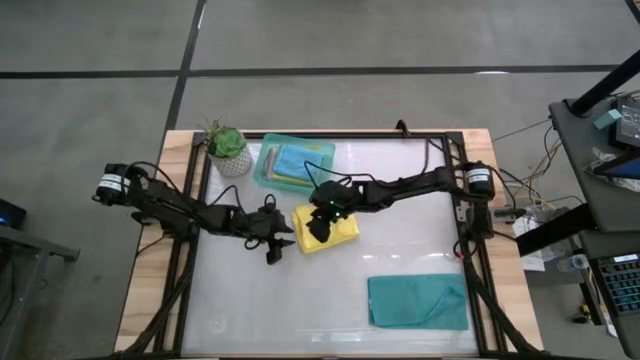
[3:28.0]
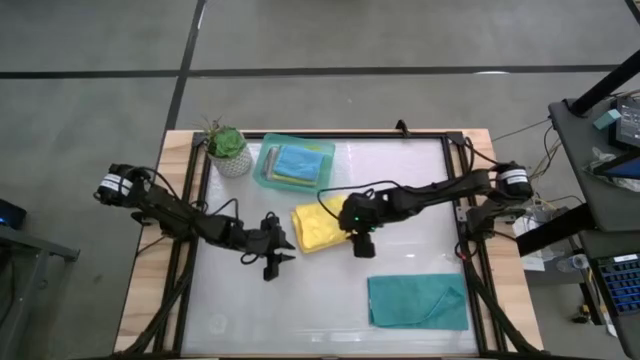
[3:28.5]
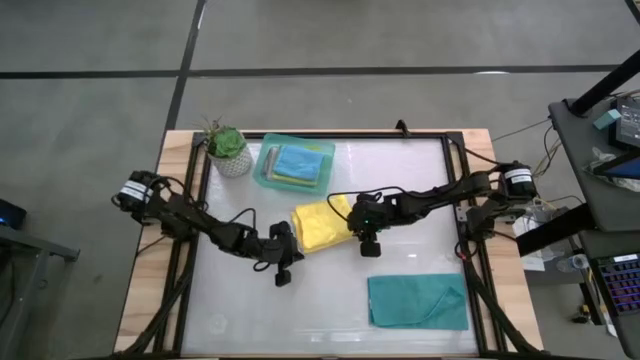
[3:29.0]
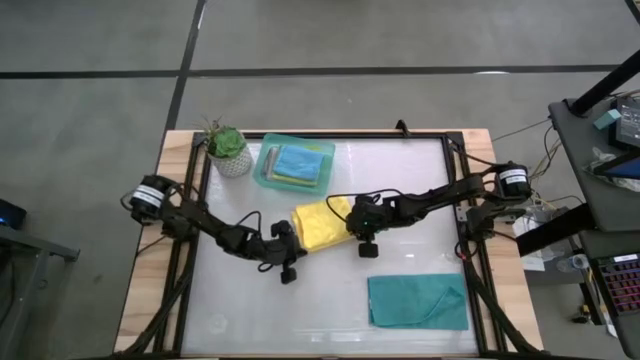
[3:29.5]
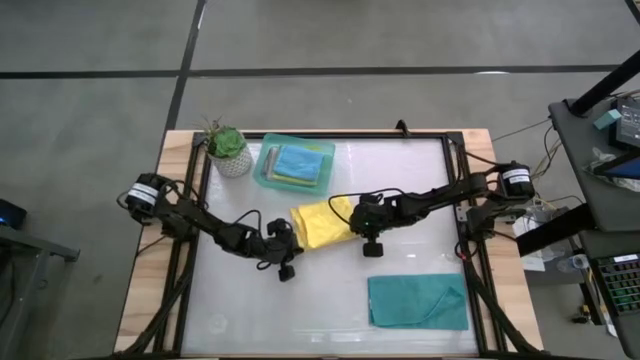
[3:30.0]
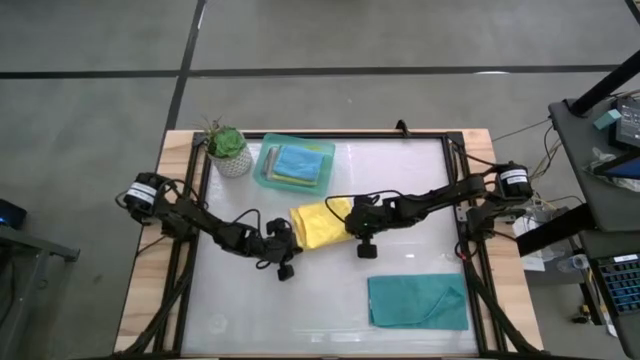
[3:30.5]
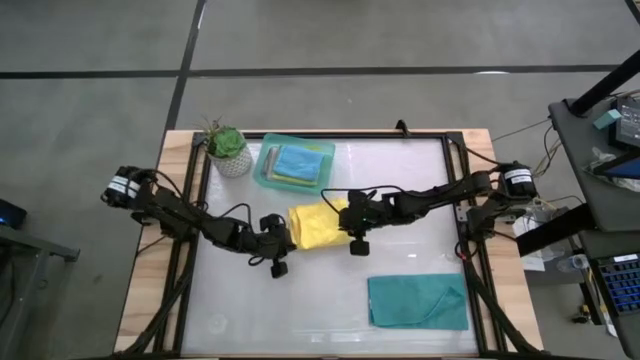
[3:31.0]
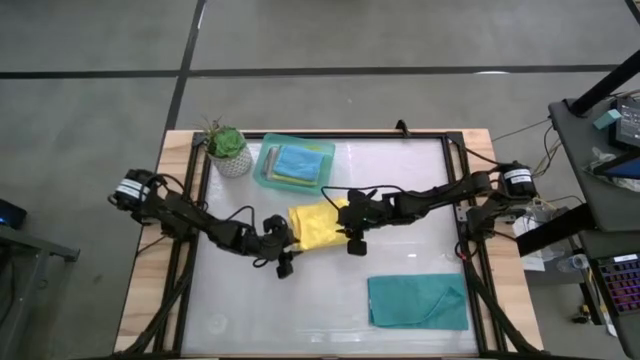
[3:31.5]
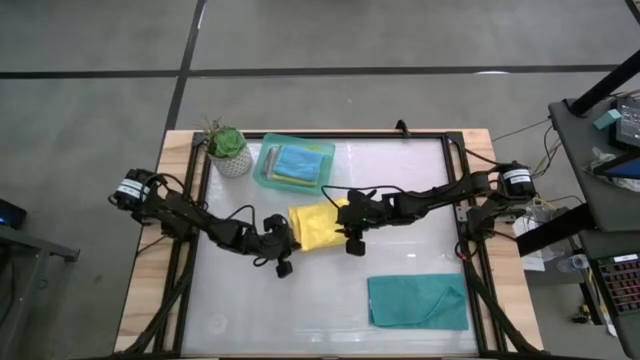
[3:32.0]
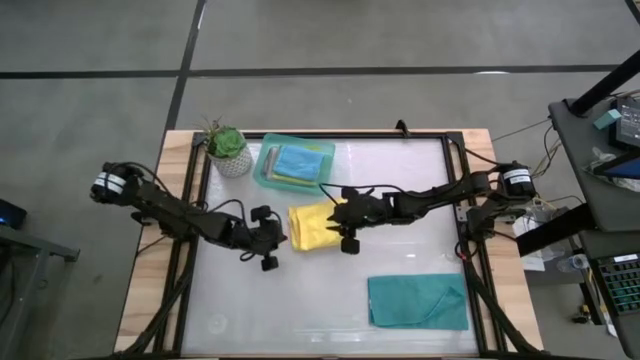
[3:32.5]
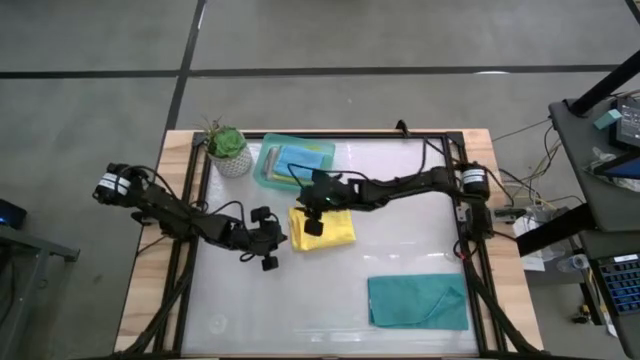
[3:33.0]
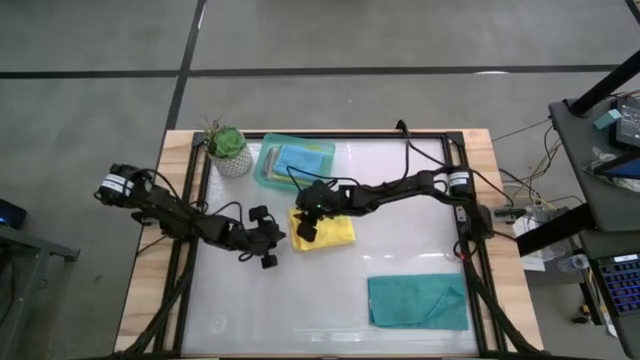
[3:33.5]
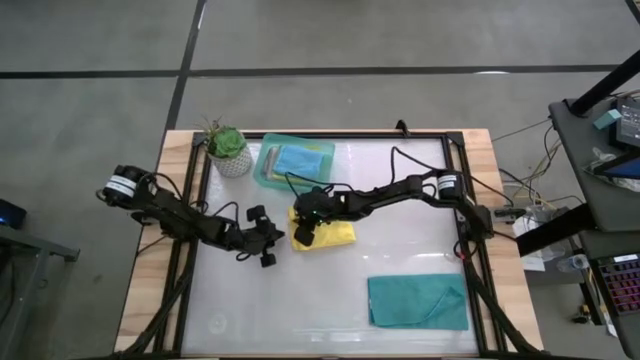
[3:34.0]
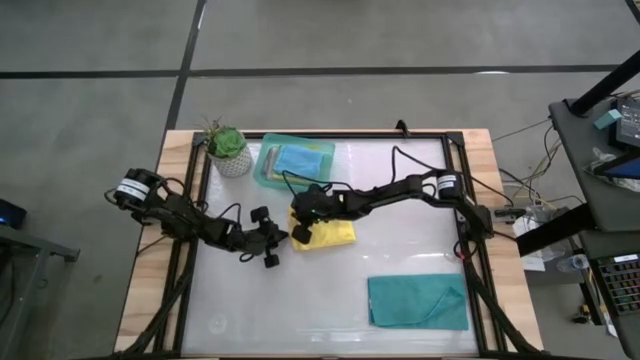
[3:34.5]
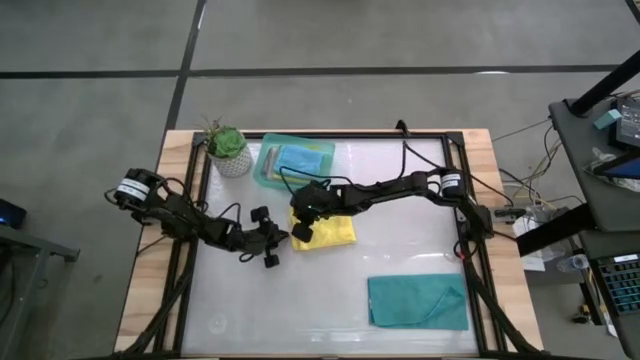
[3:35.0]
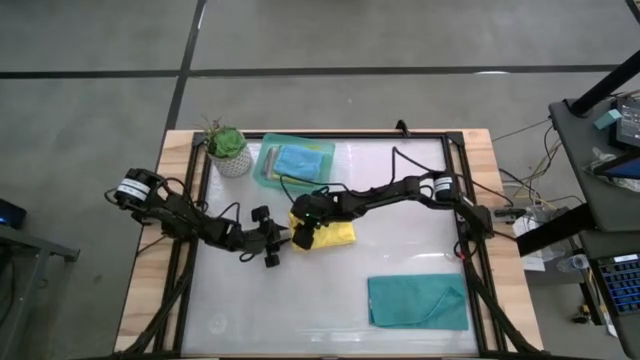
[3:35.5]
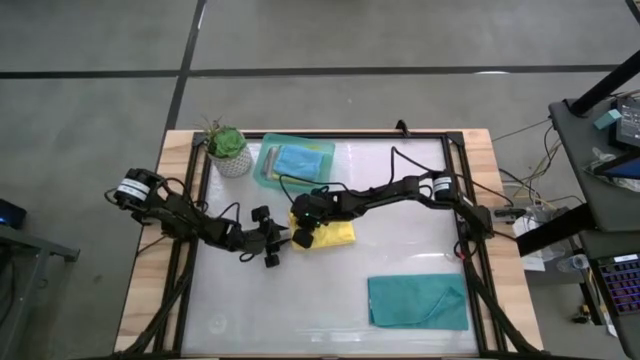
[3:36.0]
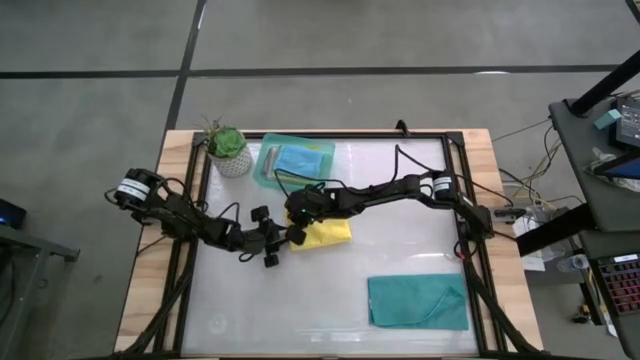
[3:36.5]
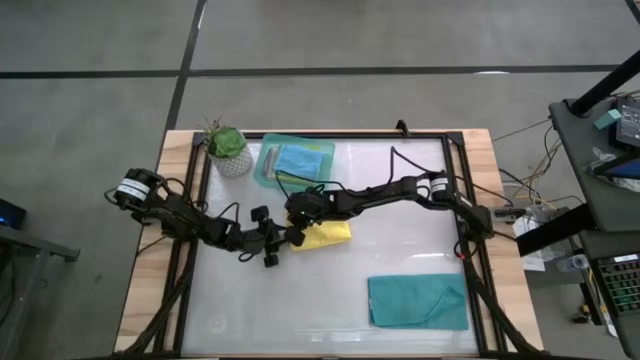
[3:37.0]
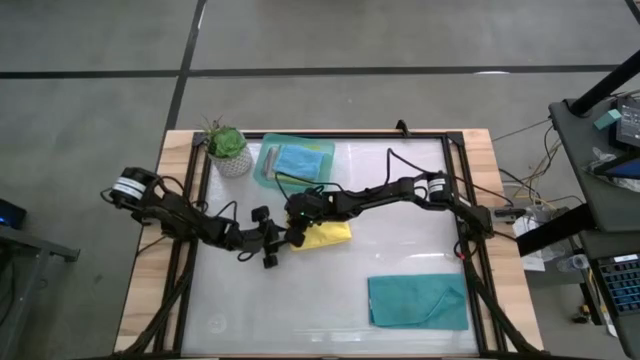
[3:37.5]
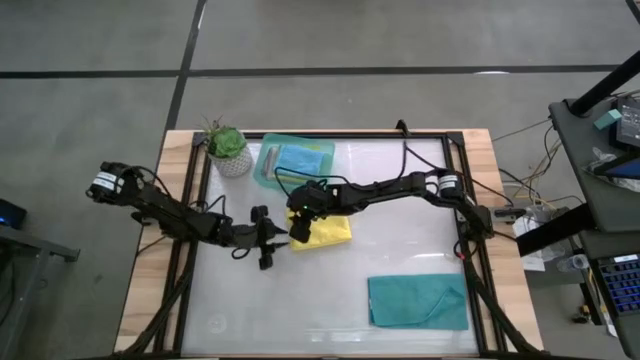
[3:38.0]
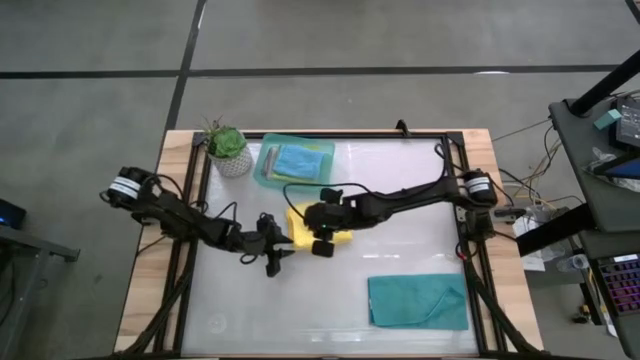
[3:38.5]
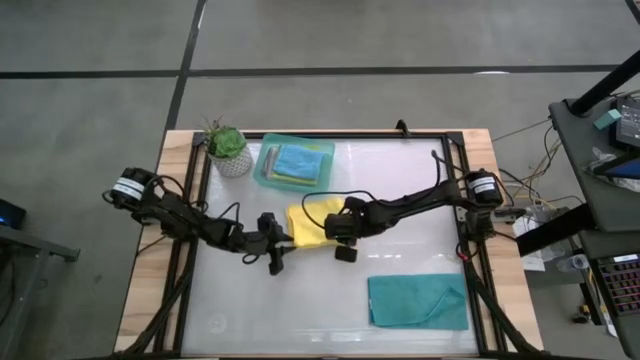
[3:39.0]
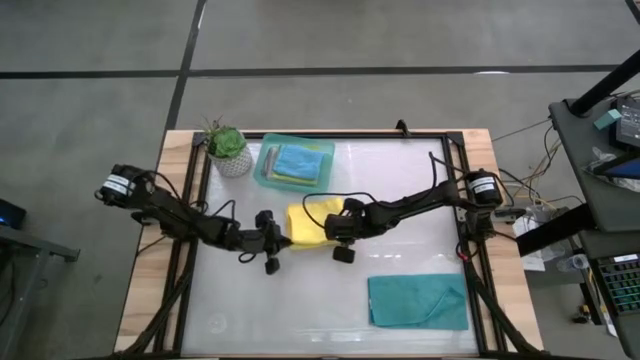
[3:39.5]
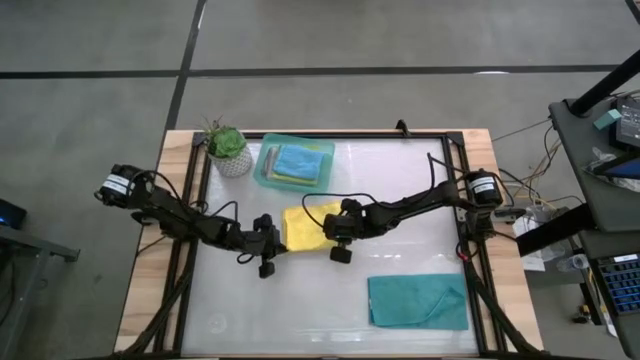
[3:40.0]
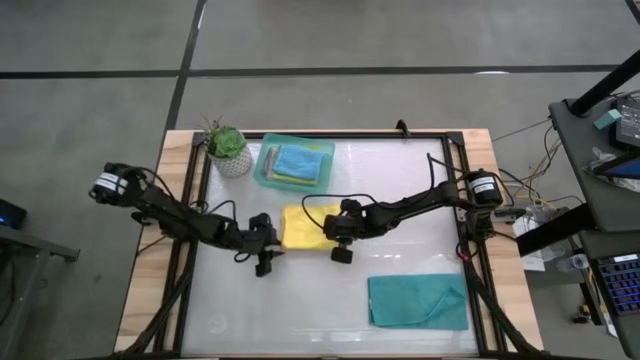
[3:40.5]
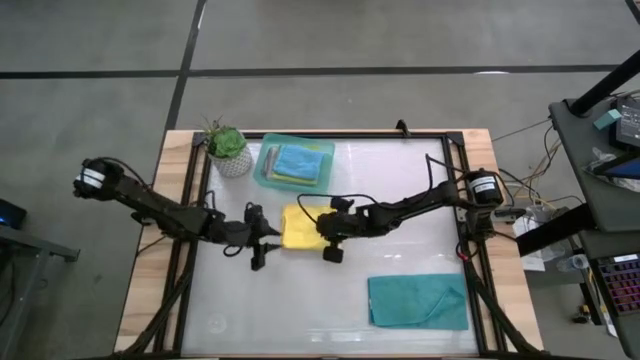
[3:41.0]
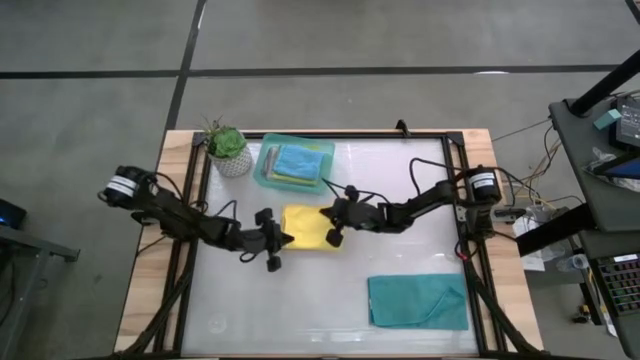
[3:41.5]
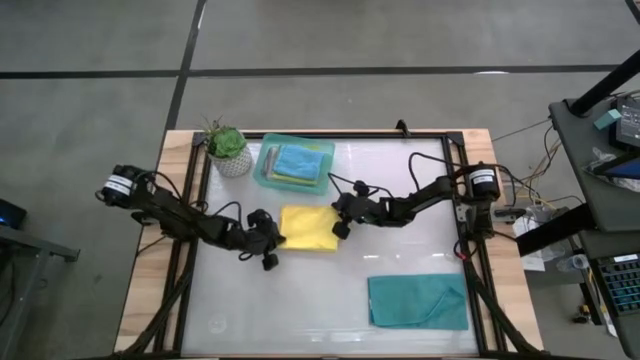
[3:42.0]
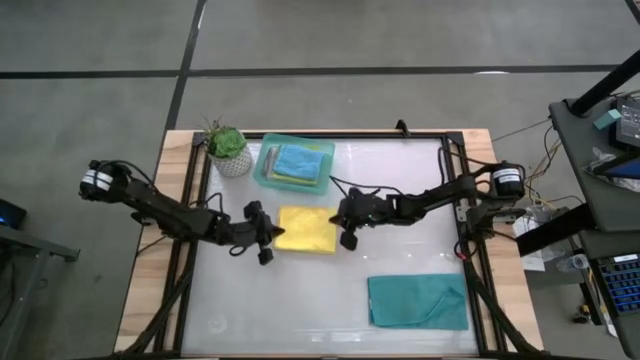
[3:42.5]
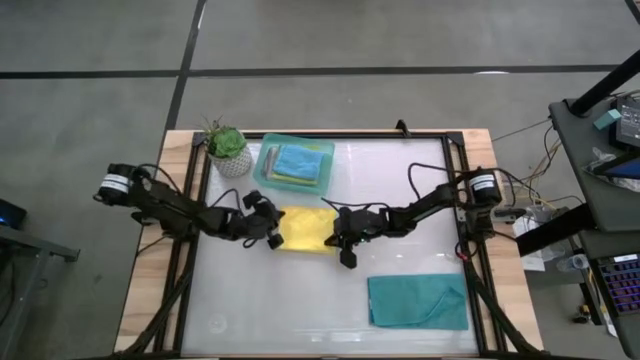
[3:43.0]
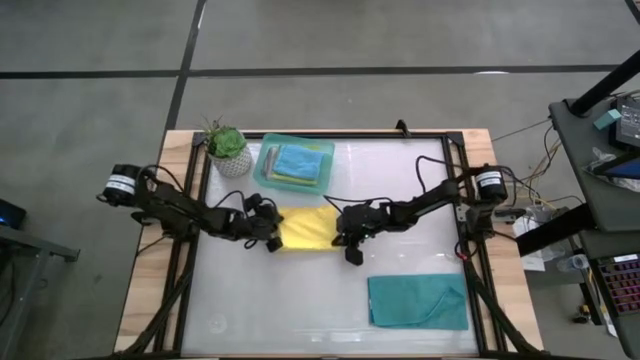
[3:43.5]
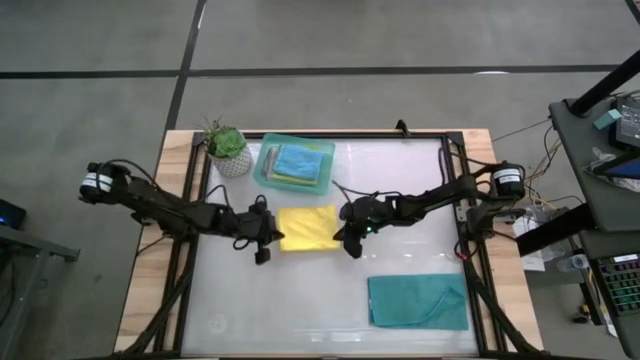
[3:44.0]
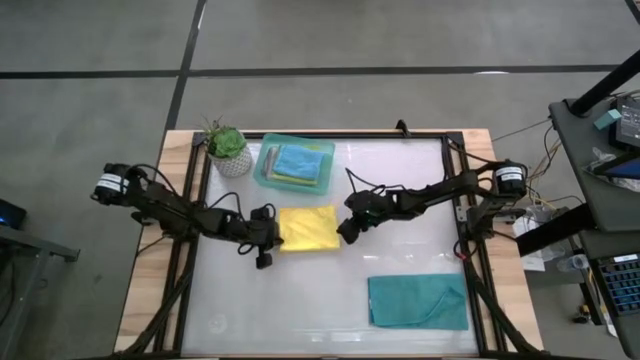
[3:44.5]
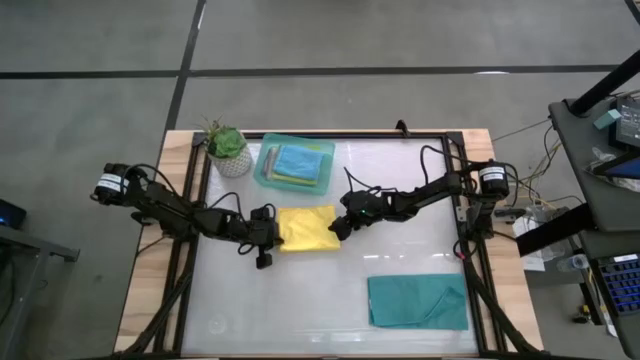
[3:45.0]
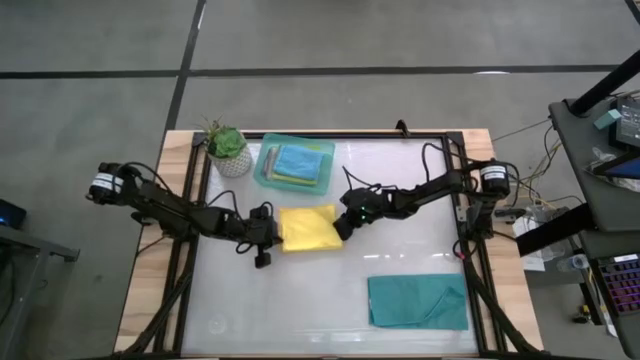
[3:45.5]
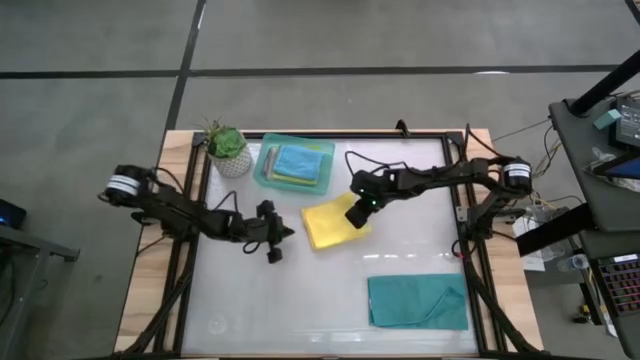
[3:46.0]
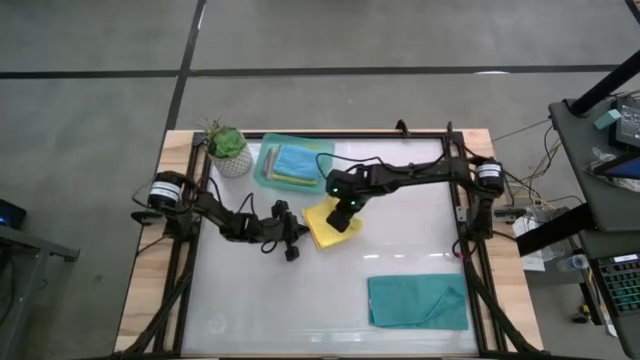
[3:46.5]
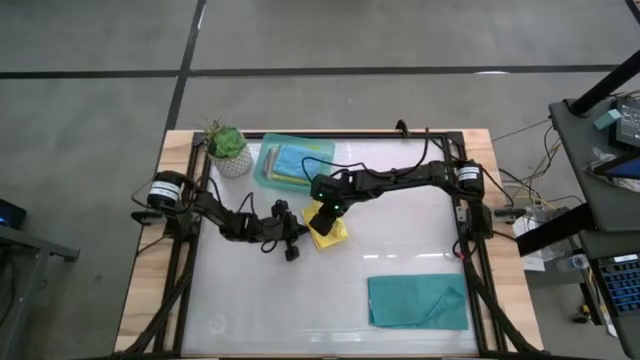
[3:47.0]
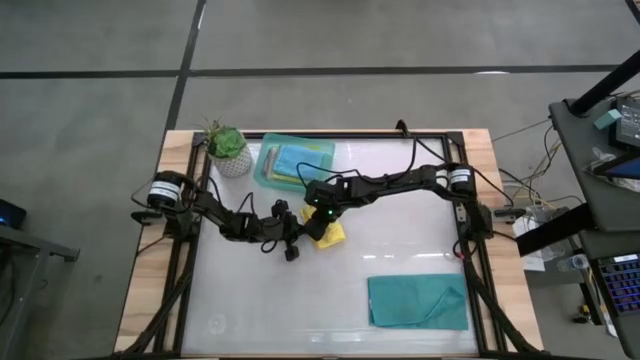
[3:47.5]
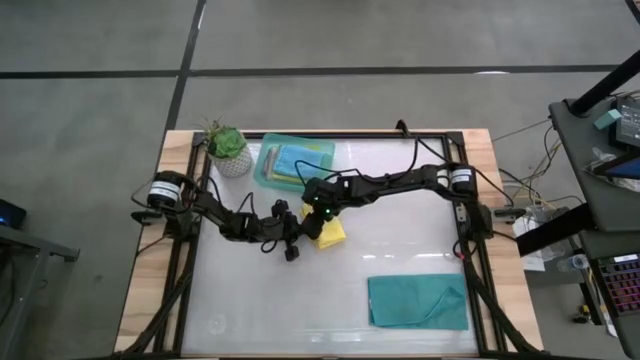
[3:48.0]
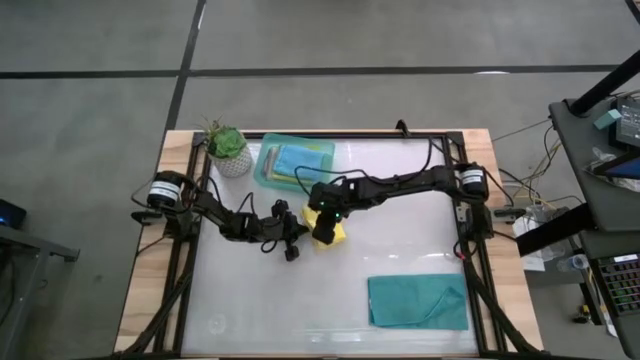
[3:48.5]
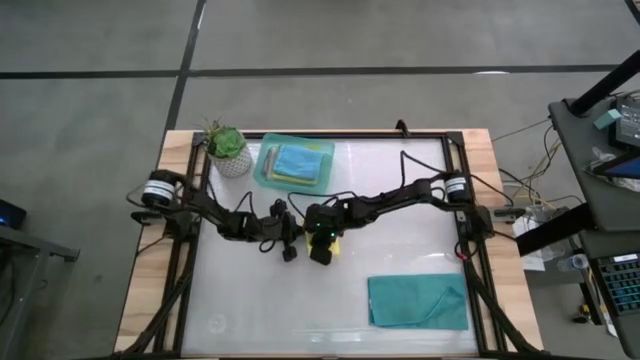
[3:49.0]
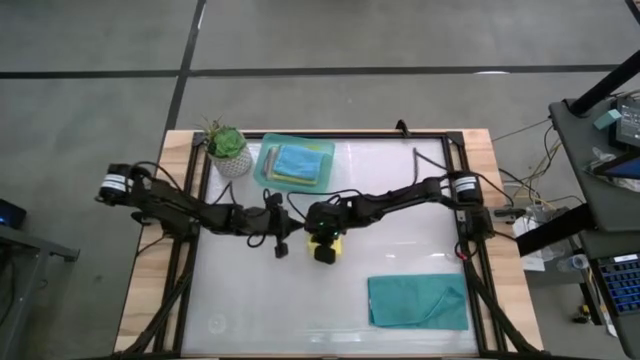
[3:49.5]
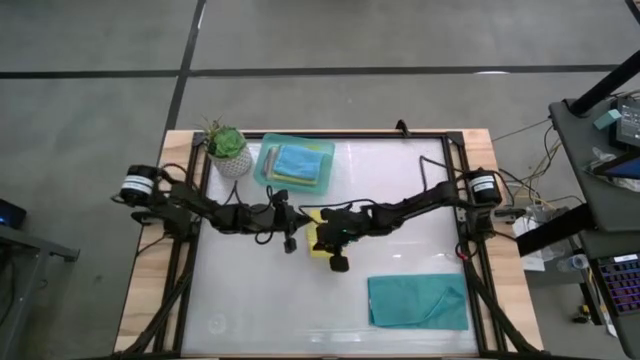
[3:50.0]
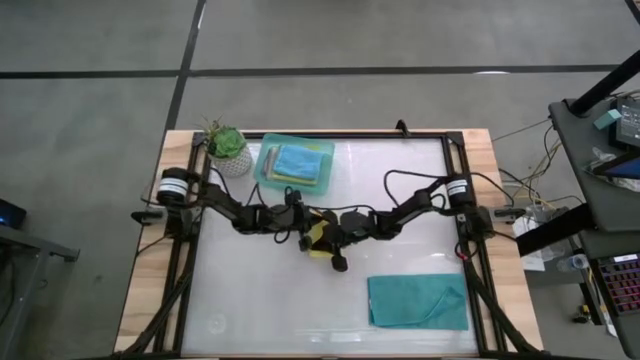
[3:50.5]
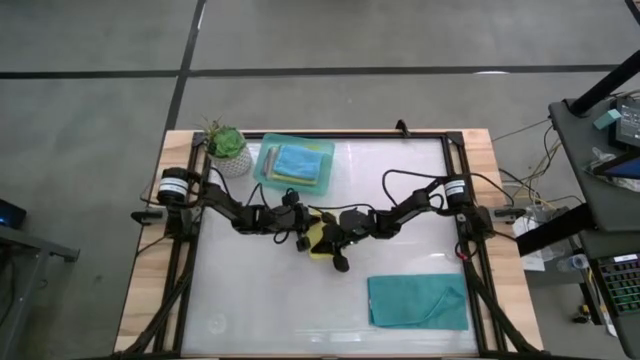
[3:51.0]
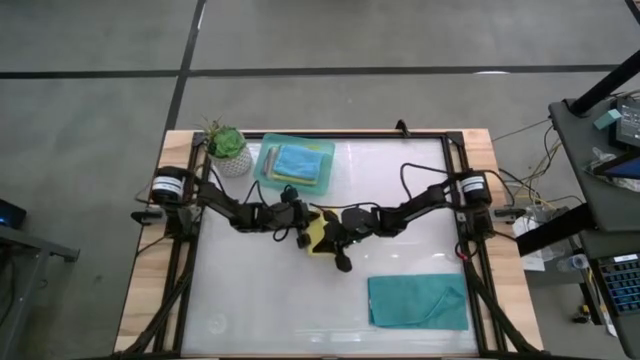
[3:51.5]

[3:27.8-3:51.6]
Task: Fold microfiber towels
Fold the yellow microfiber towel
